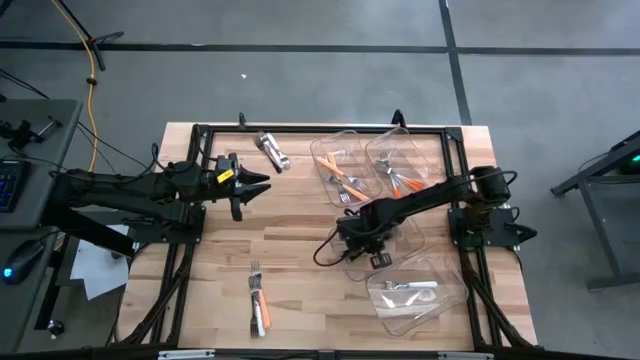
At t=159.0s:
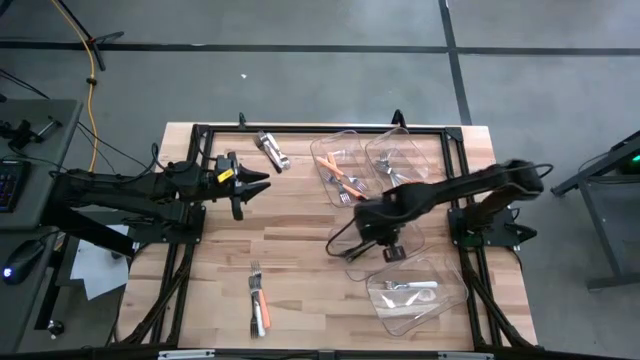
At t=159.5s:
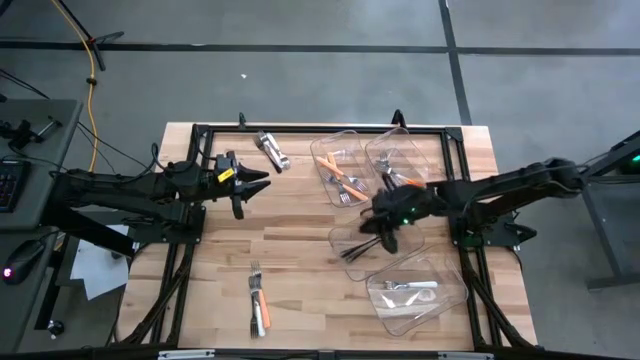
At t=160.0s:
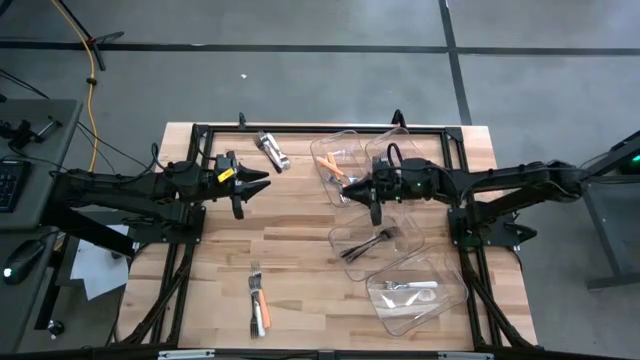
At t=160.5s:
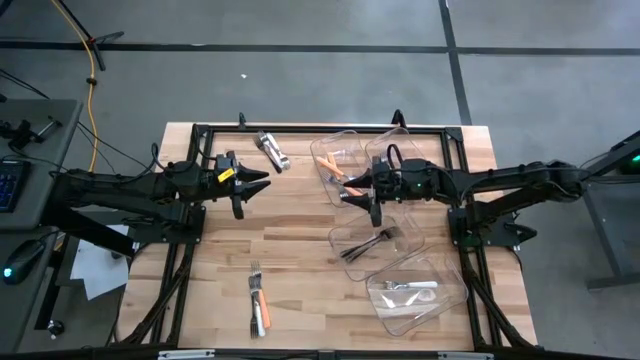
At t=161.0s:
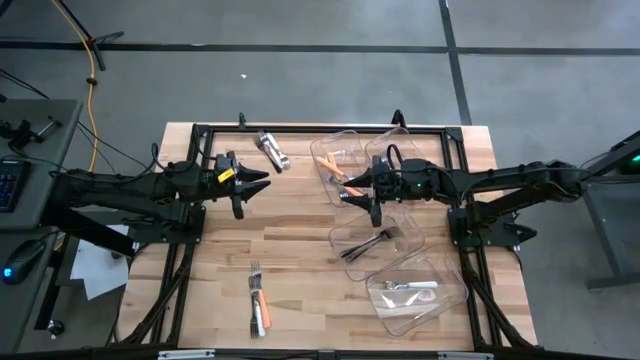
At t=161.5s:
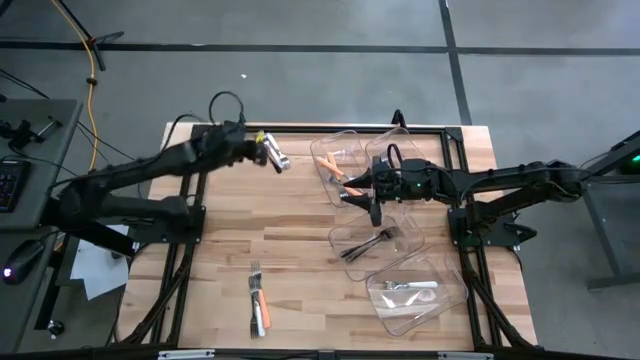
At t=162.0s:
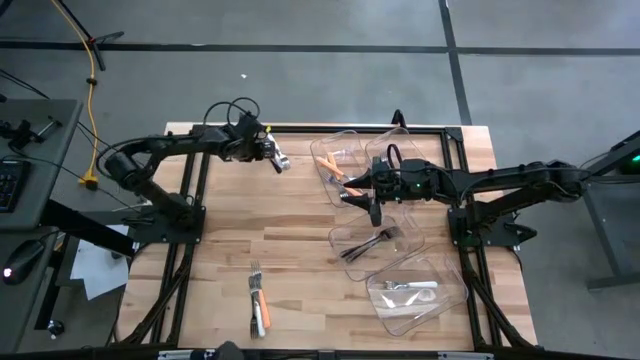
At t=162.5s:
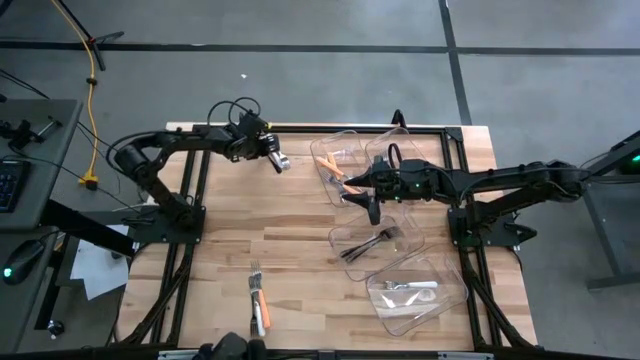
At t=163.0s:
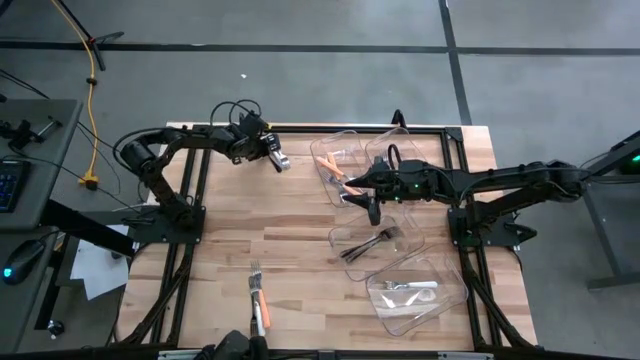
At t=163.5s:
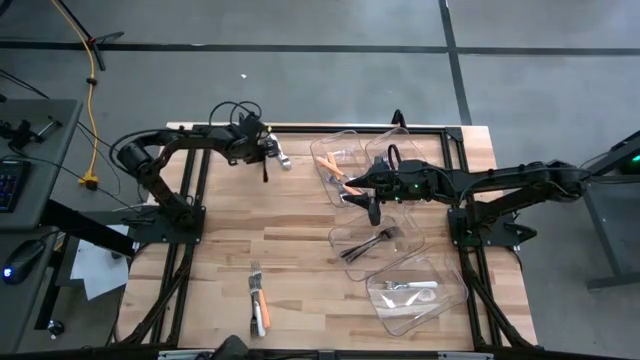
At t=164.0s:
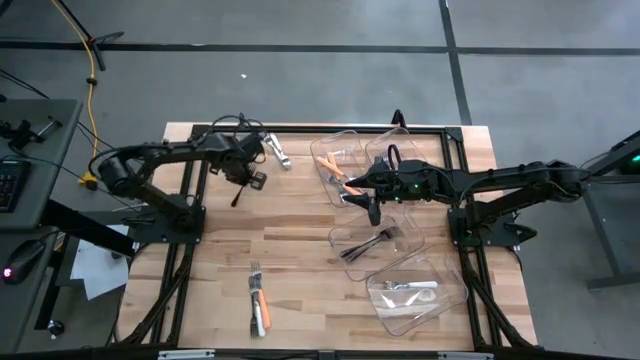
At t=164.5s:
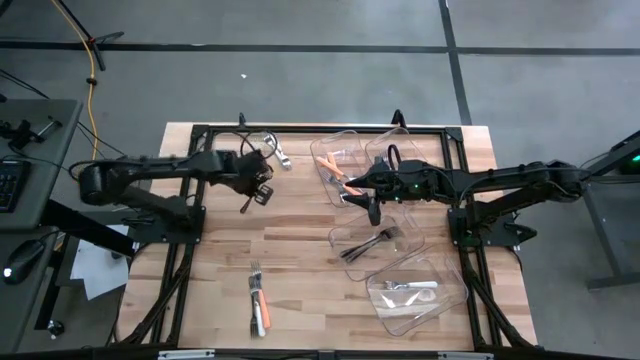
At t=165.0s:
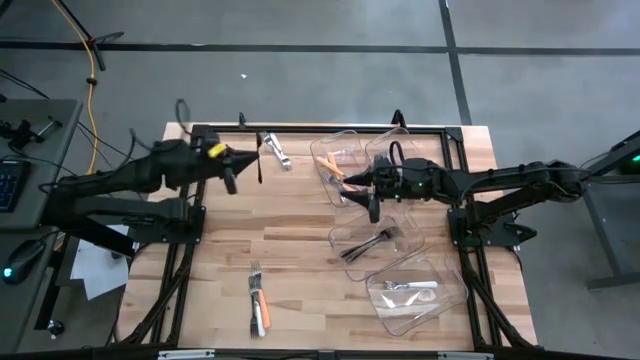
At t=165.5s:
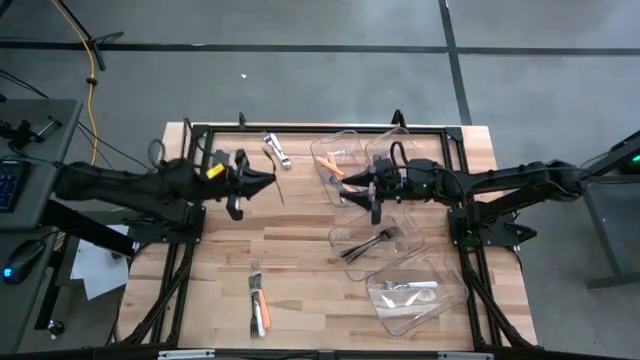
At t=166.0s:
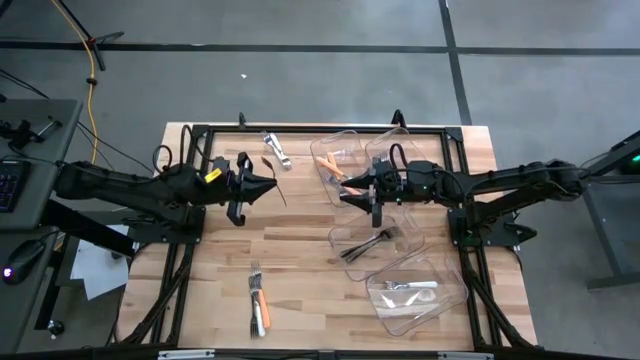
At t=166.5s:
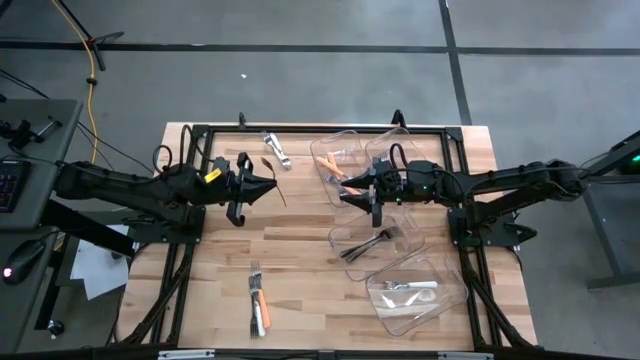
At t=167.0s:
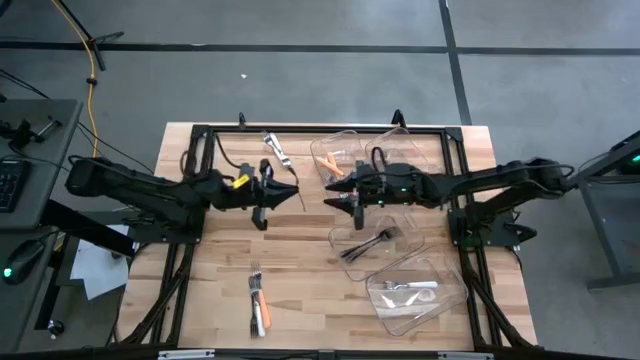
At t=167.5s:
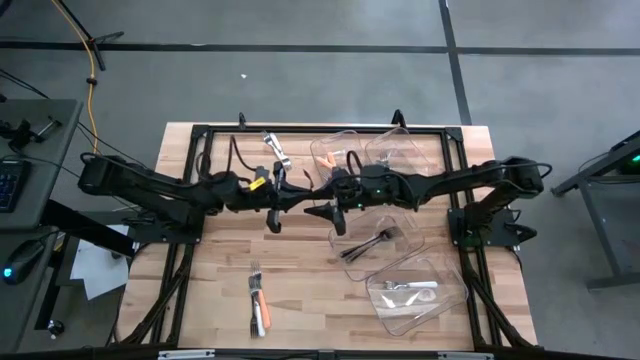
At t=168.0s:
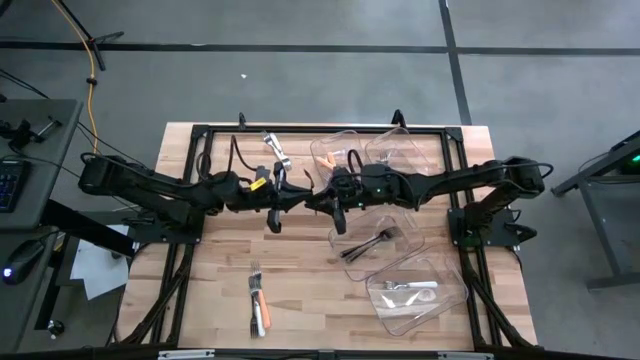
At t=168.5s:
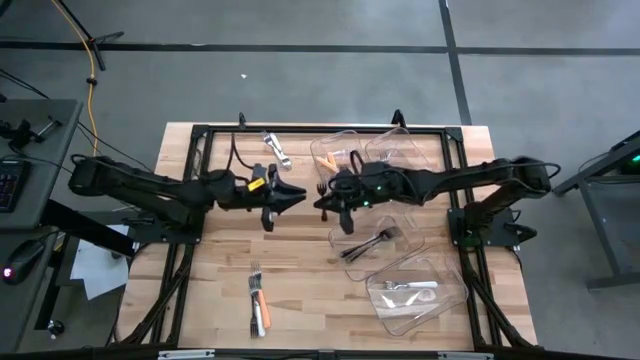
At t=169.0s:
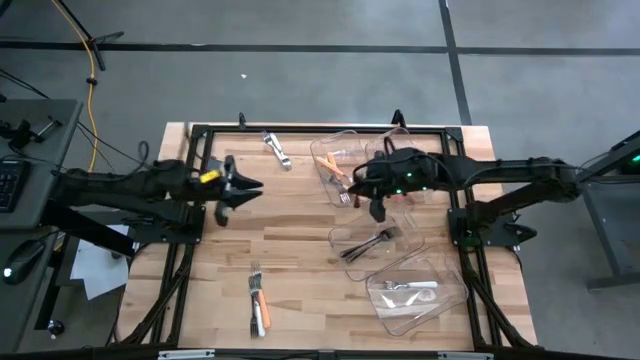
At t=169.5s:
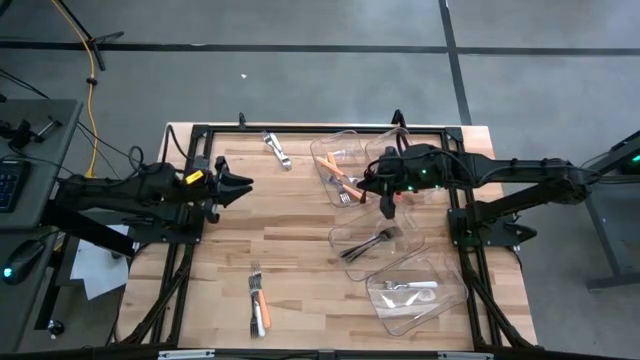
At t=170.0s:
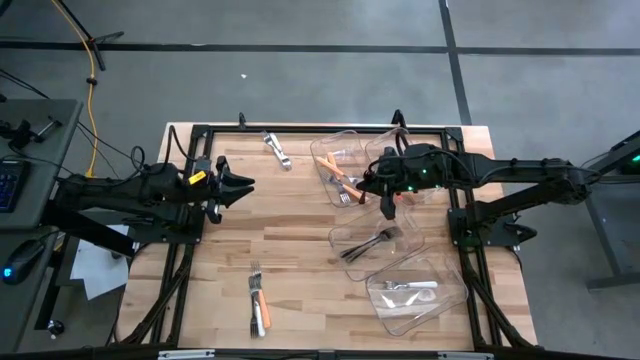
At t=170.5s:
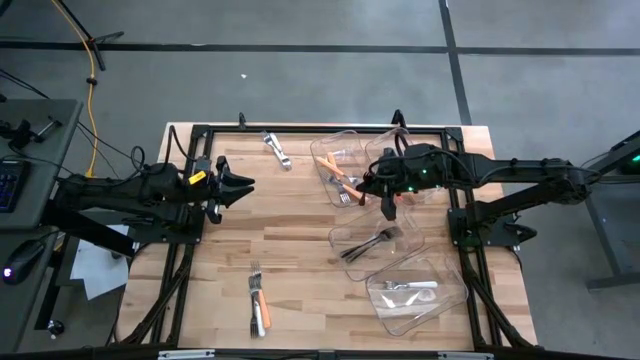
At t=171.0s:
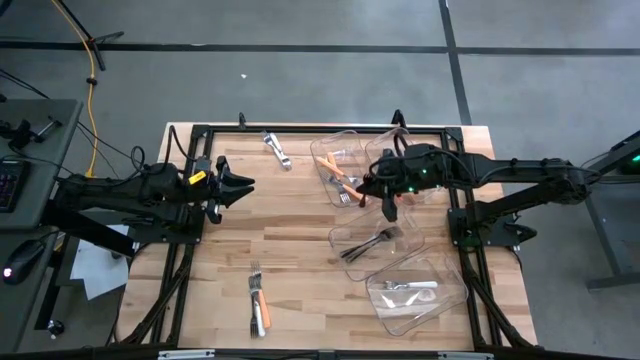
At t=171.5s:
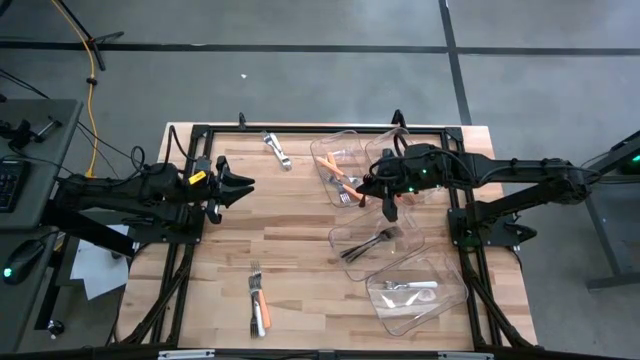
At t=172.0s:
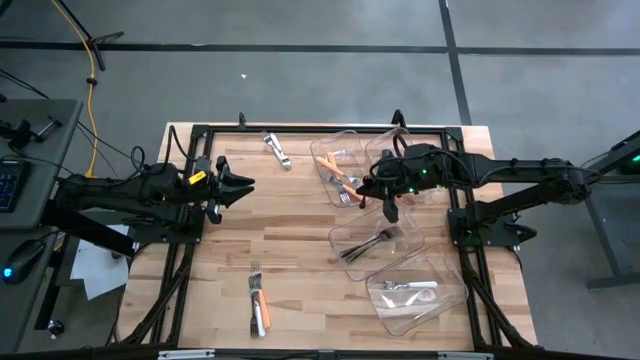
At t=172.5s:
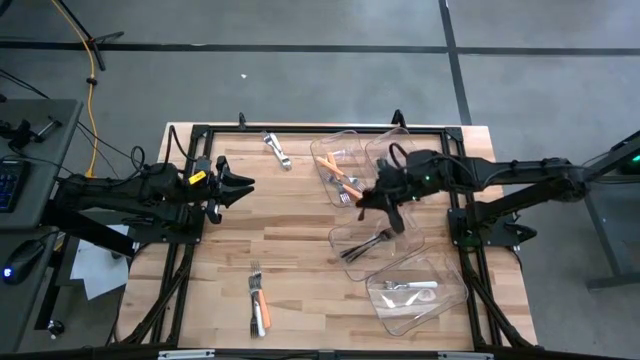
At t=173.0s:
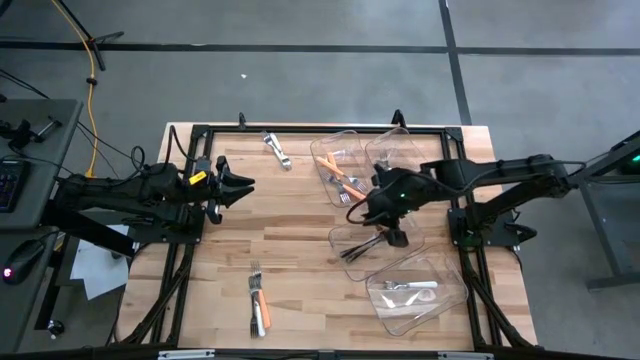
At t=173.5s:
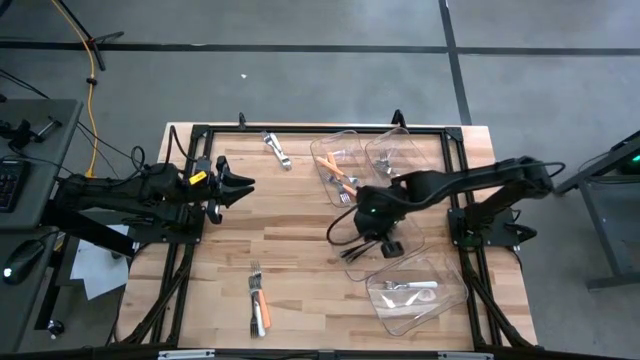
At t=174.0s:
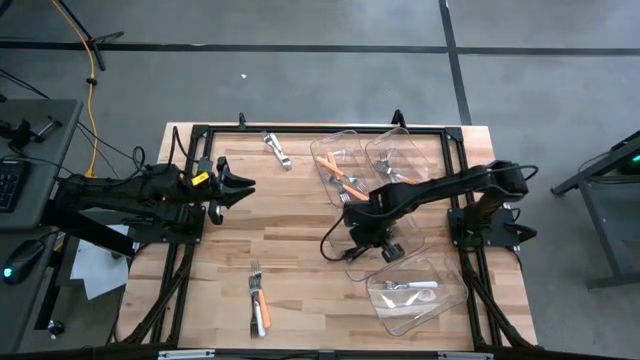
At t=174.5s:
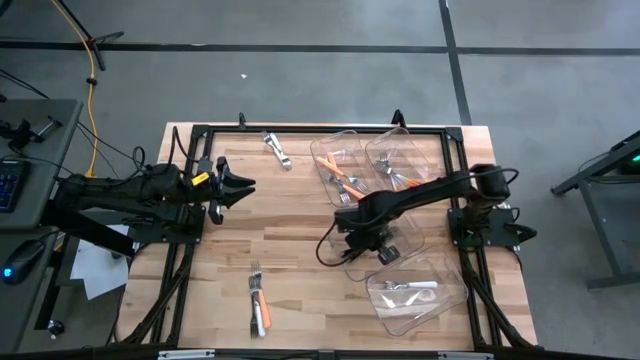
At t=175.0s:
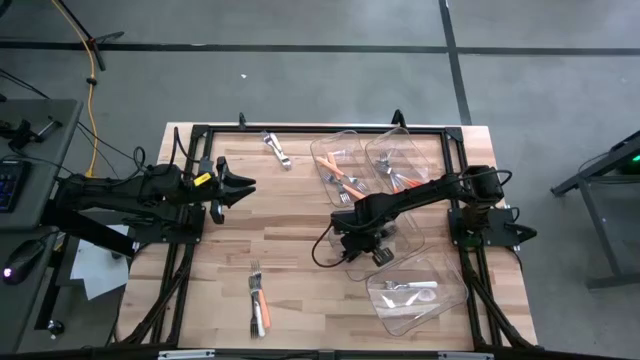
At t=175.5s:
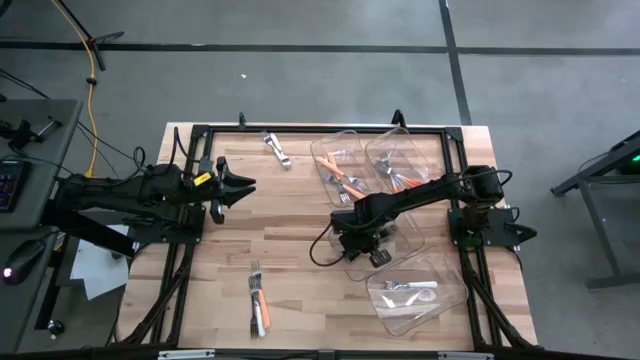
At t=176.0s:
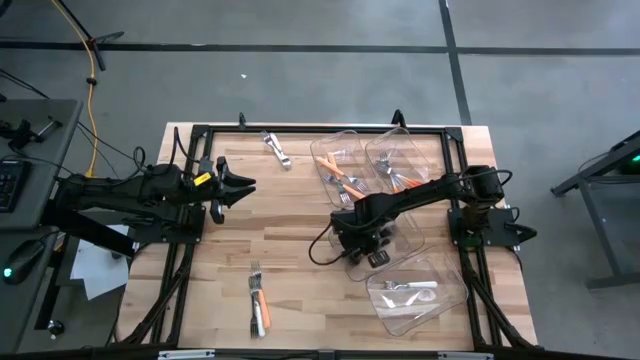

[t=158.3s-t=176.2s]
Task: Sort silverware by color (type)
Move the black fork from the top

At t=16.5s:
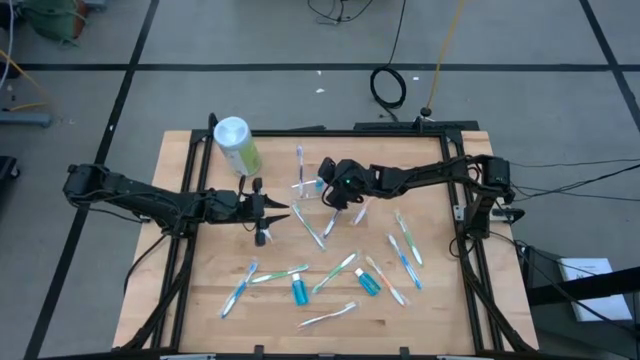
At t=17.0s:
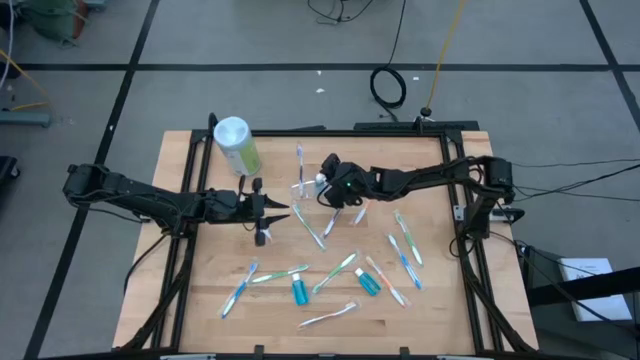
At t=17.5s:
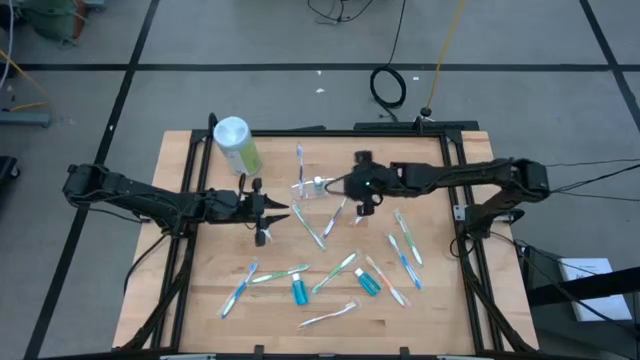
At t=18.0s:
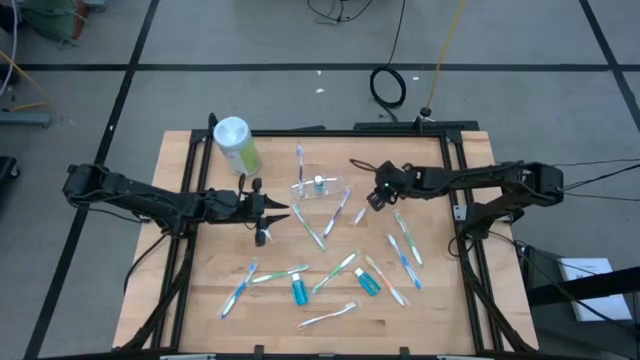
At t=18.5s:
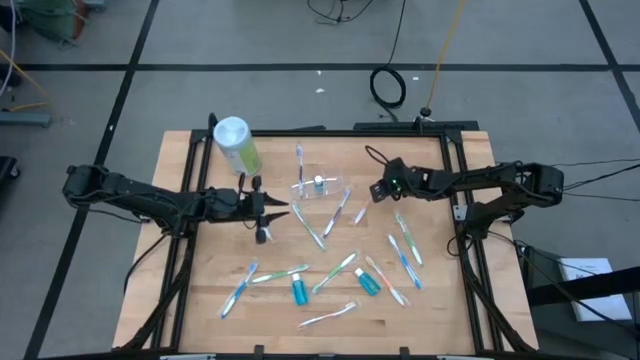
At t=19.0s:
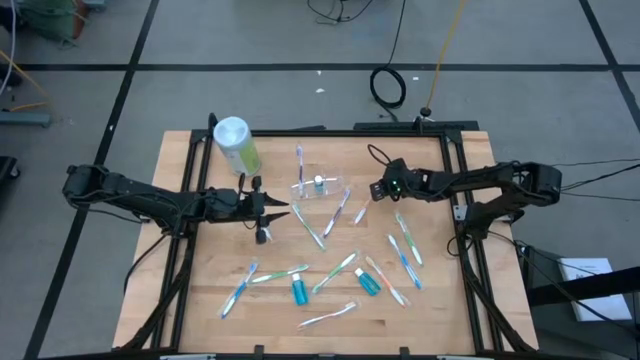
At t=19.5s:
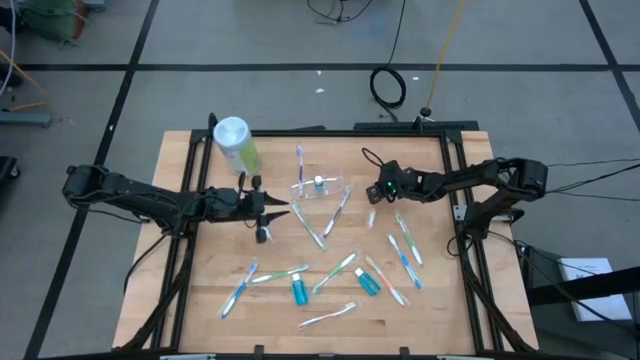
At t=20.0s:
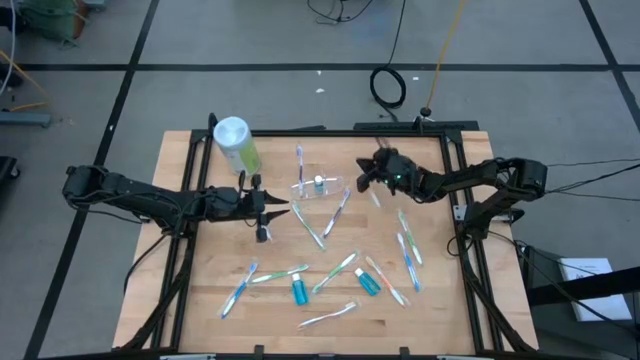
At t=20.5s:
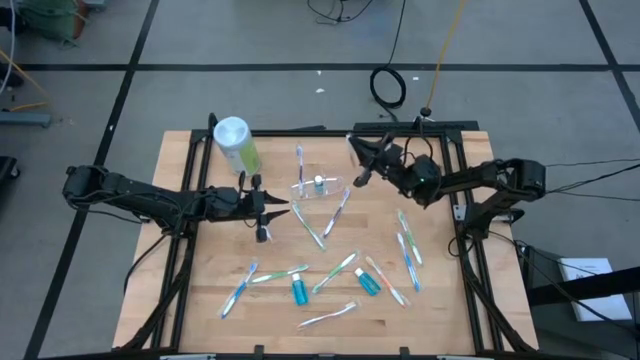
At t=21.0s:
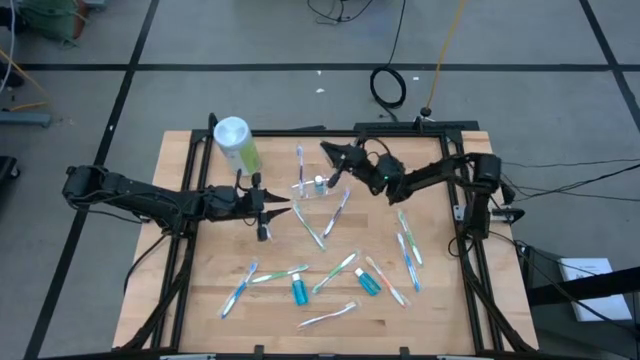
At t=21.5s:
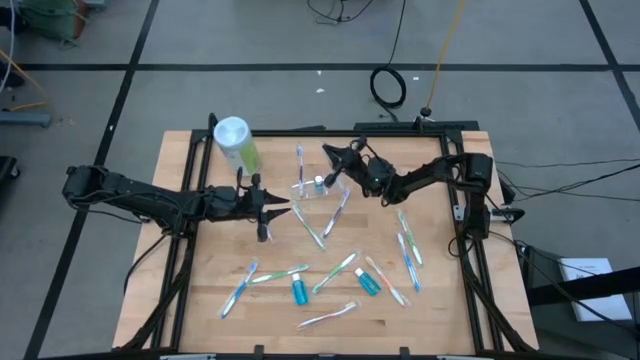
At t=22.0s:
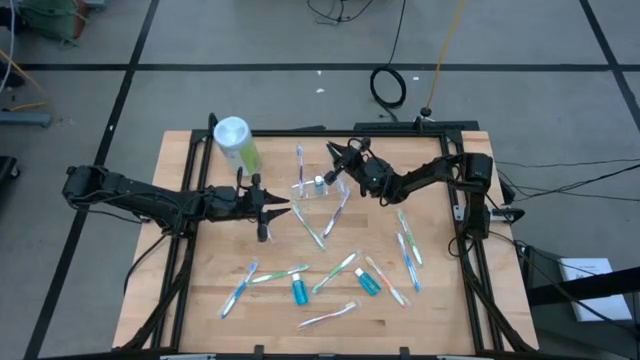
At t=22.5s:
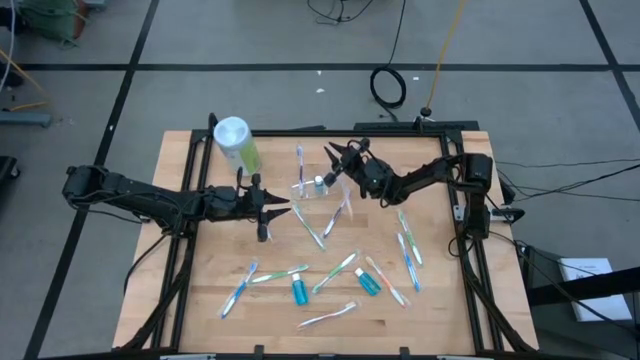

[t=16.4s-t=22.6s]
Task: Pick & Place toothbrushing station
Put the orange toothbrush into the transparent organizer
